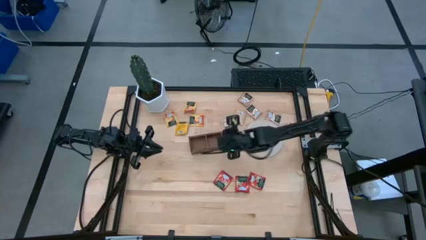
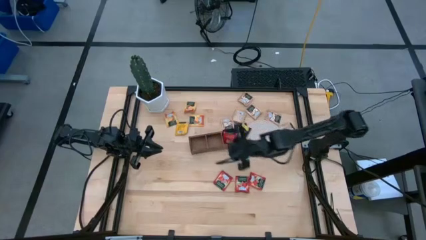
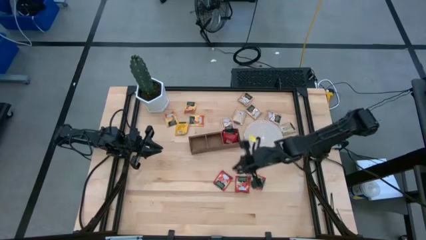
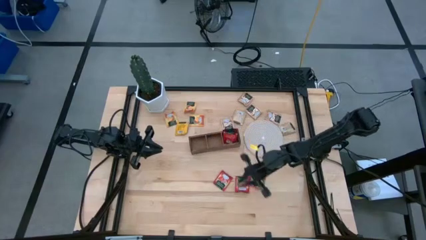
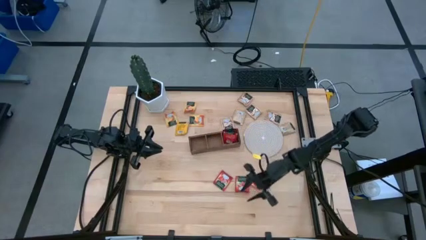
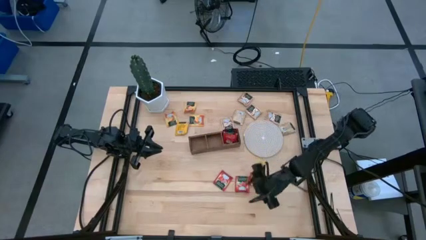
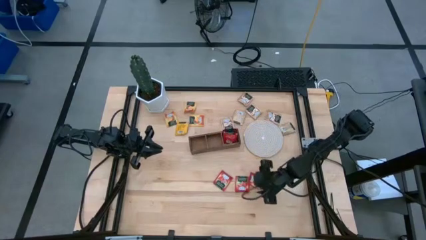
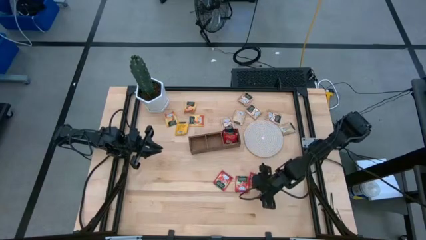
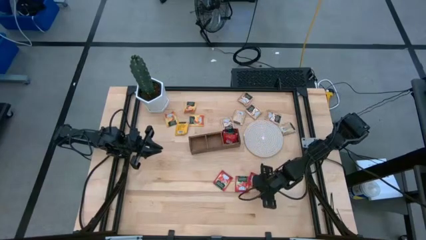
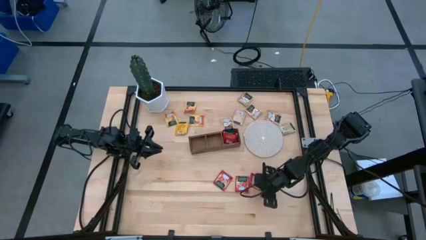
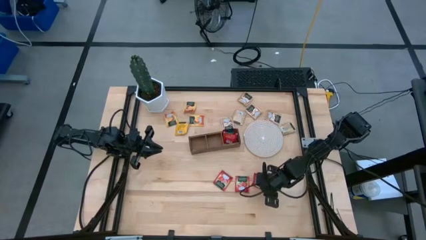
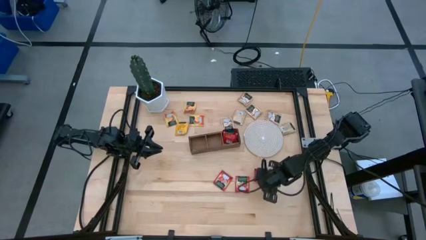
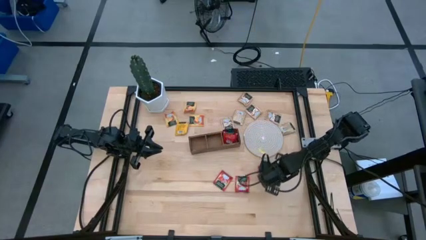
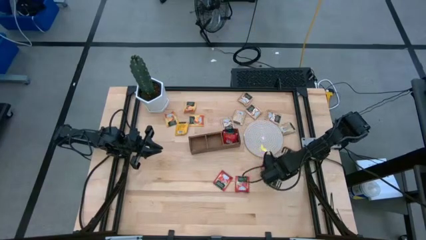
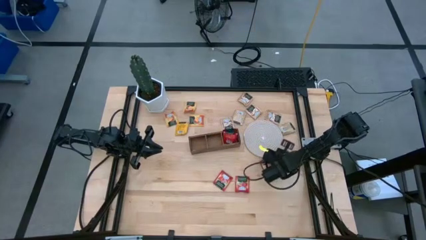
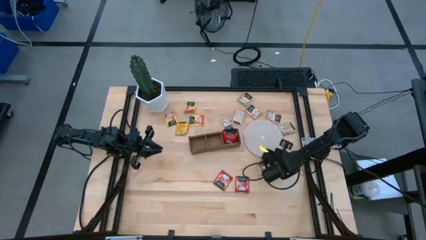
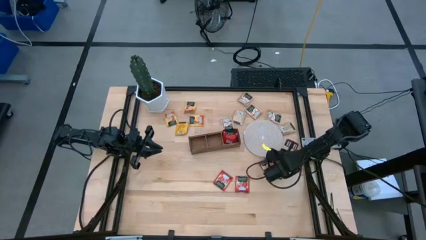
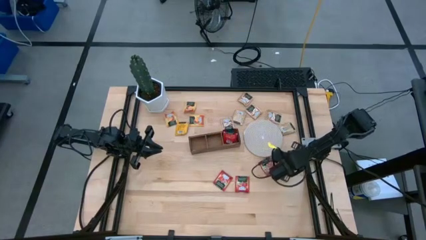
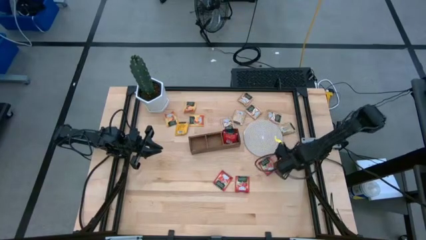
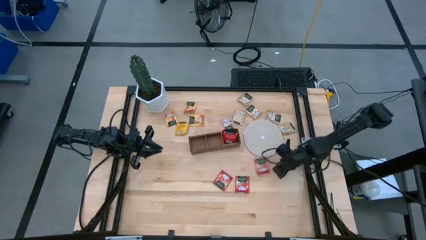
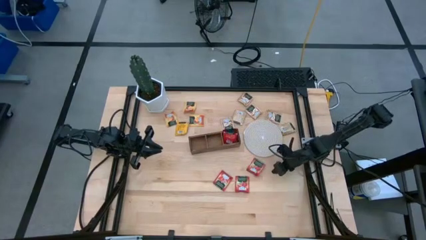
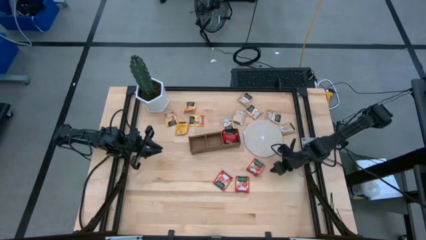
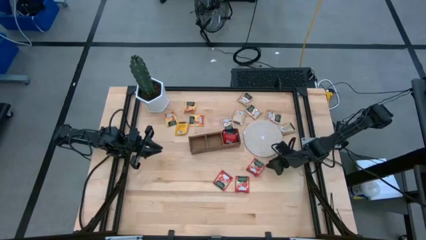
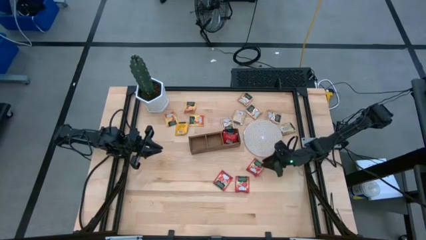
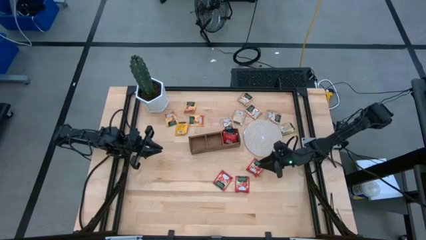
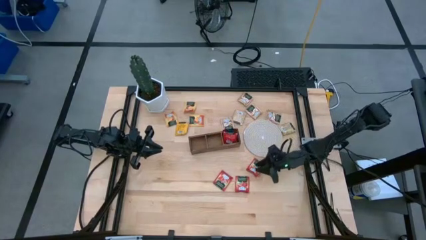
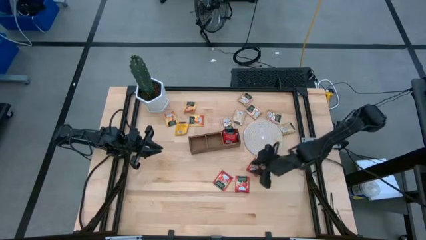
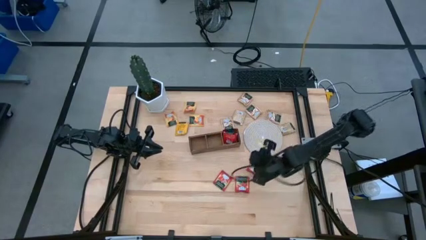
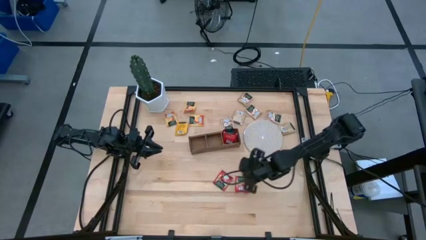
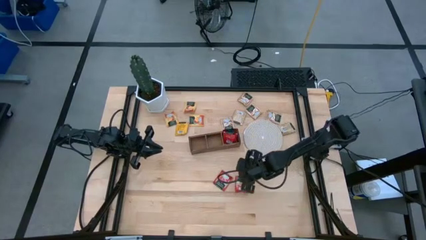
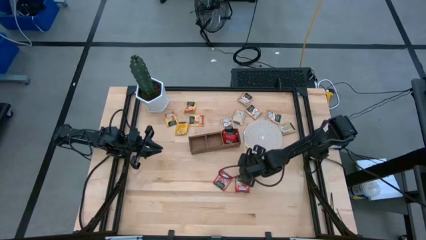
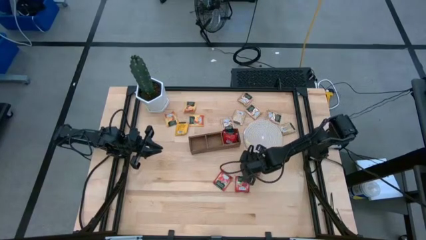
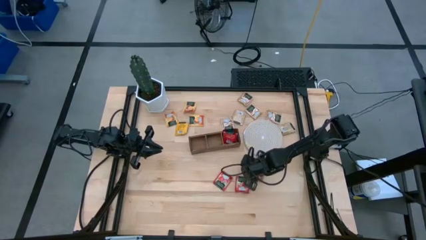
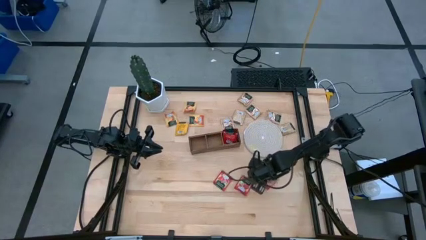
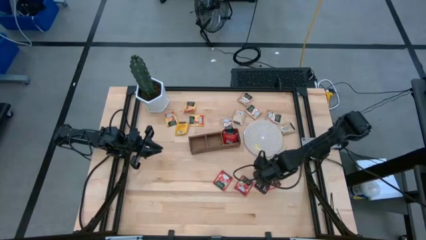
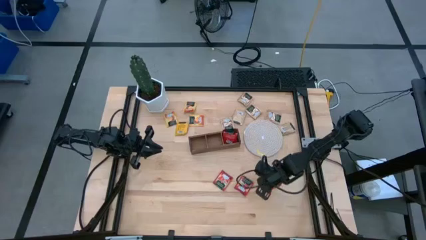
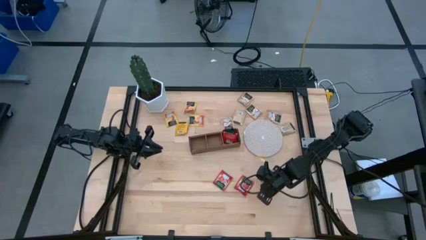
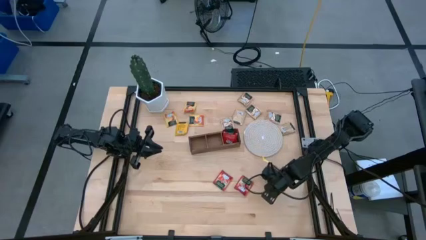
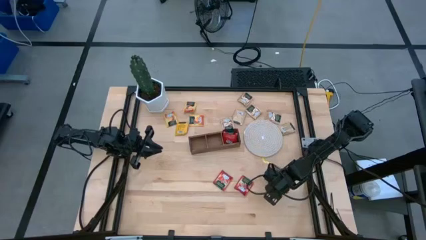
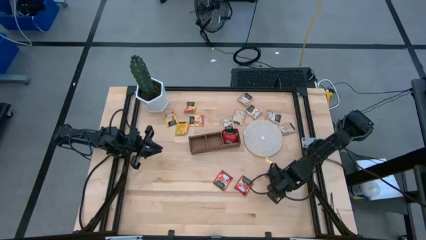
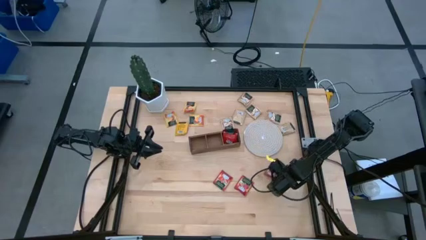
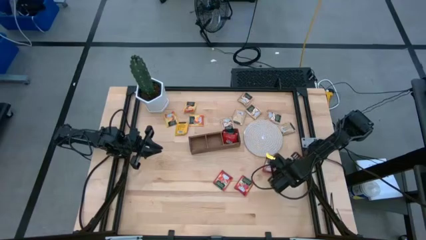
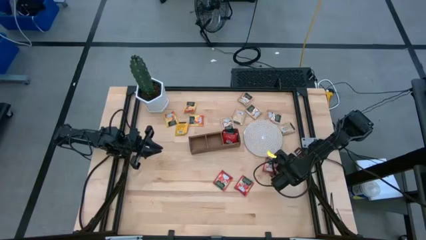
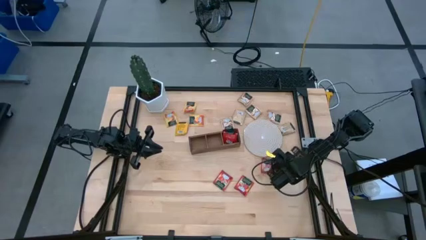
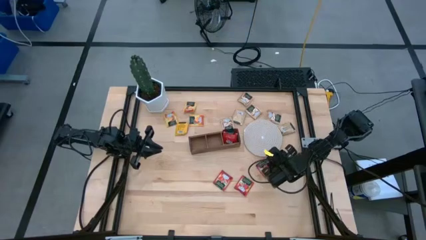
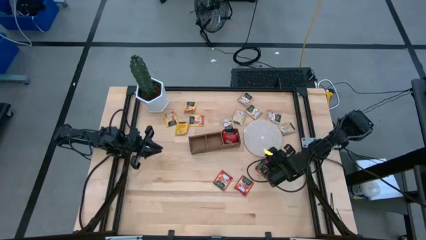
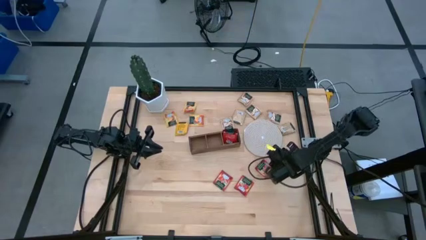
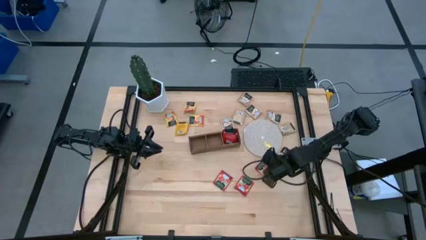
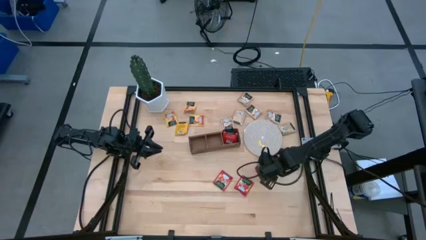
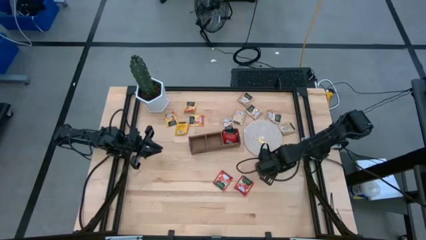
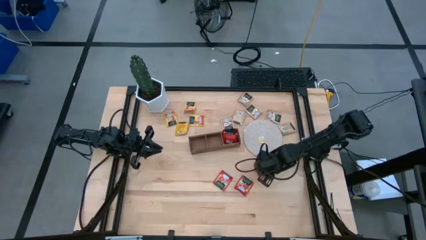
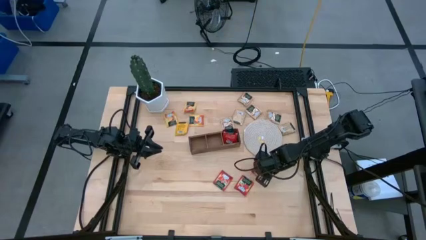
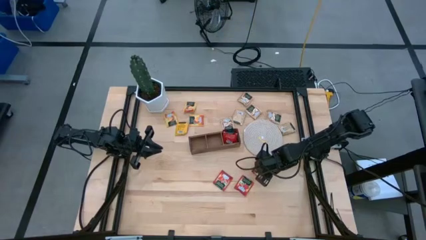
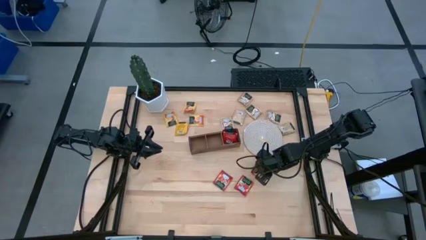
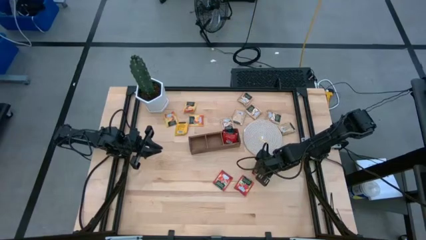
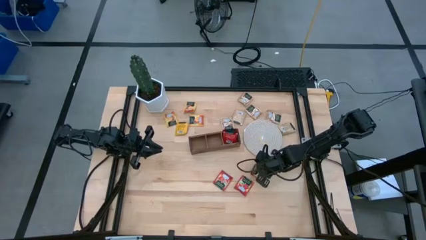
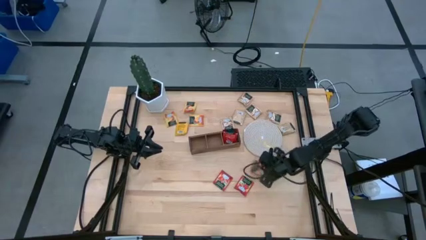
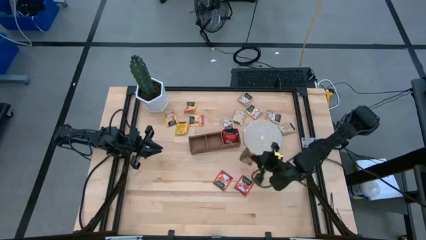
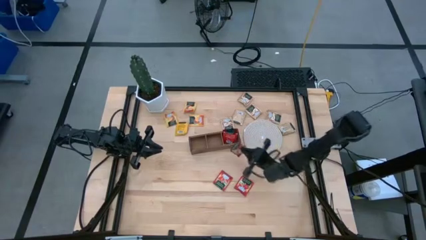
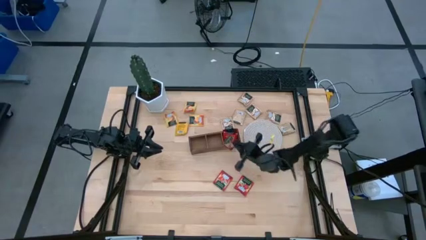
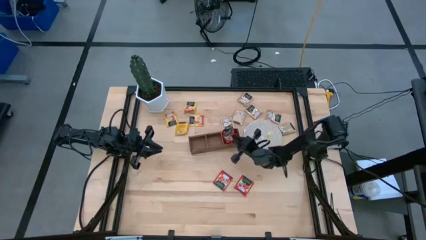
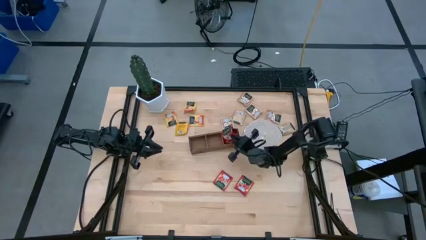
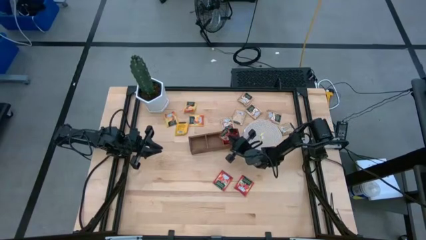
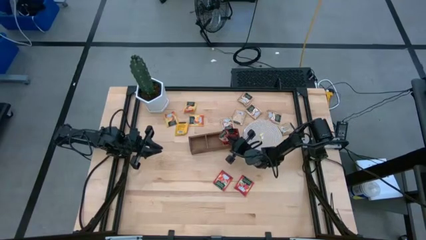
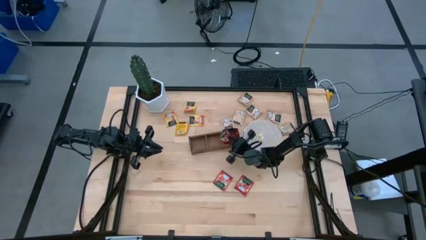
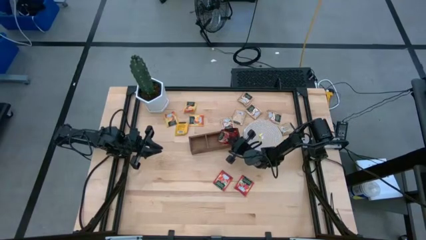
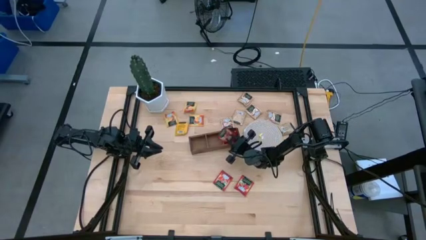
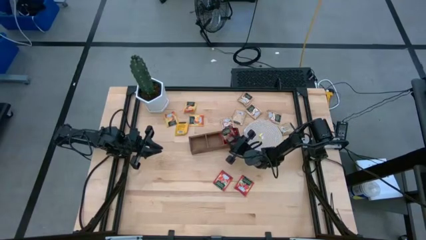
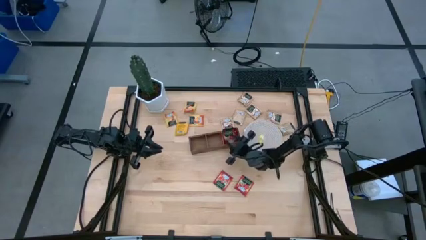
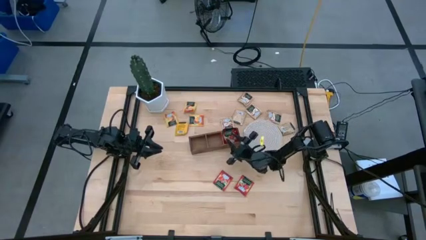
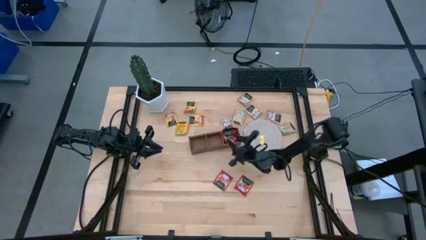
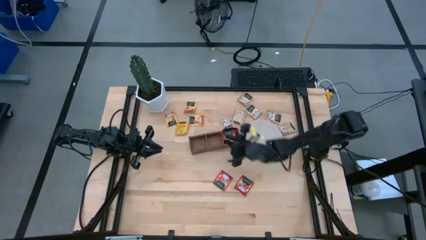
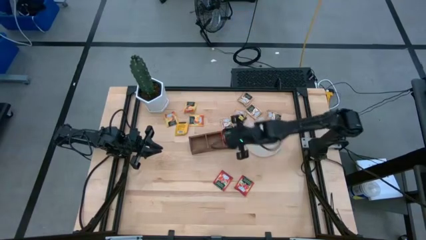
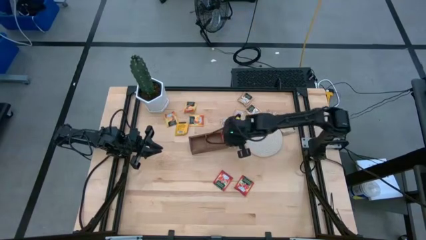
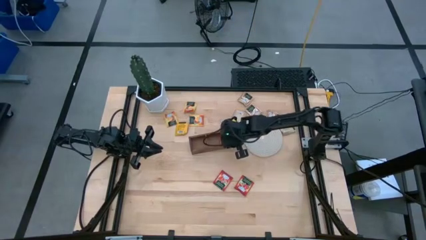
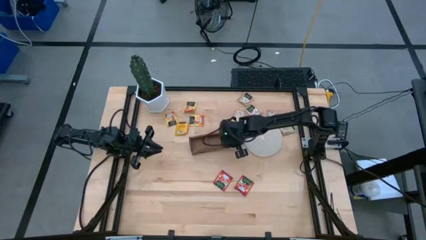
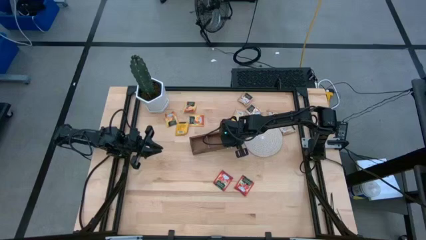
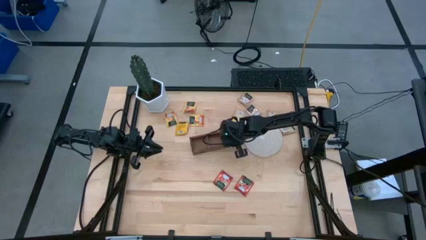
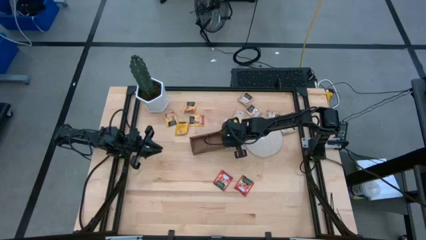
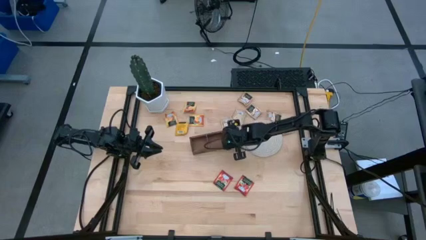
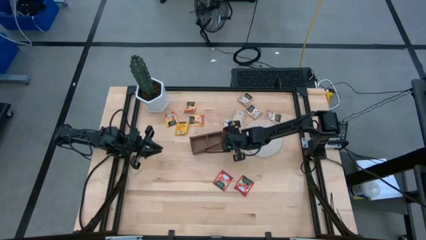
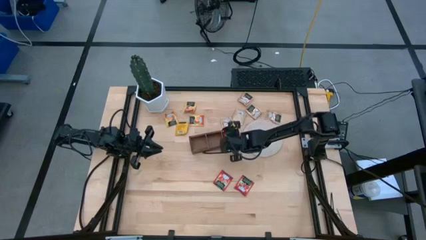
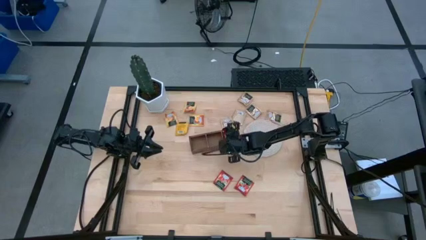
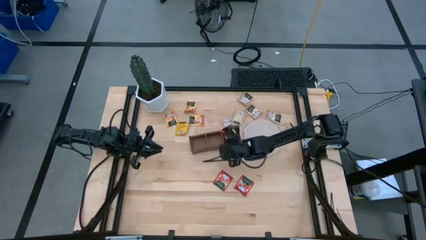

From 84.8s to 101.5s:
Task: Pick & Place Tea
Put the red tea bag into the right section of the wooden organizer
